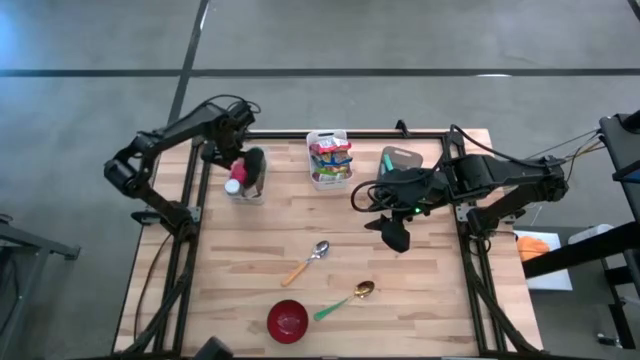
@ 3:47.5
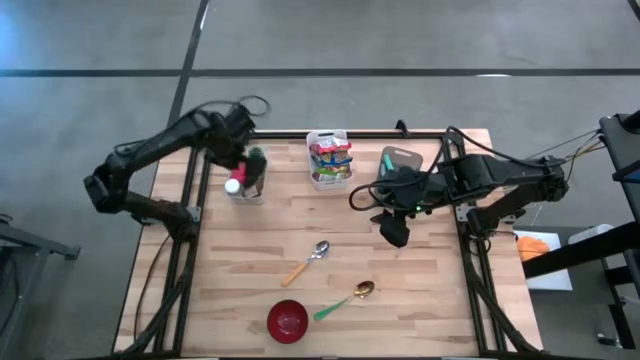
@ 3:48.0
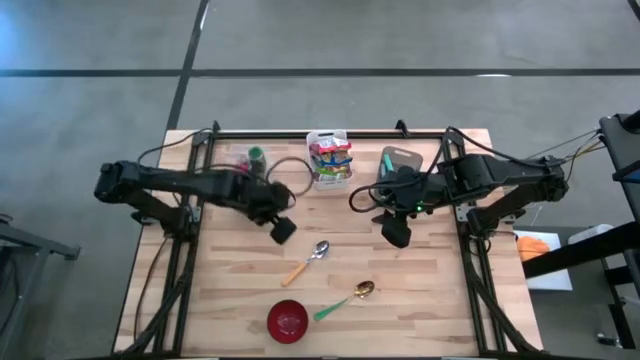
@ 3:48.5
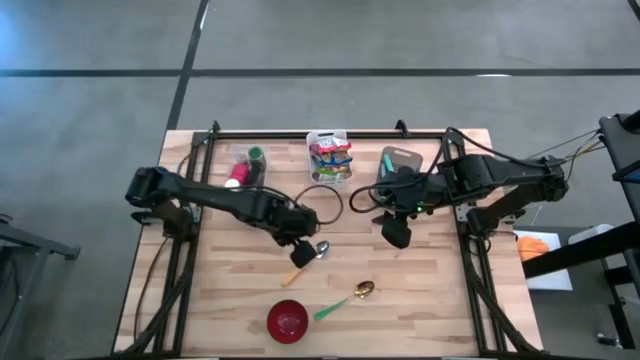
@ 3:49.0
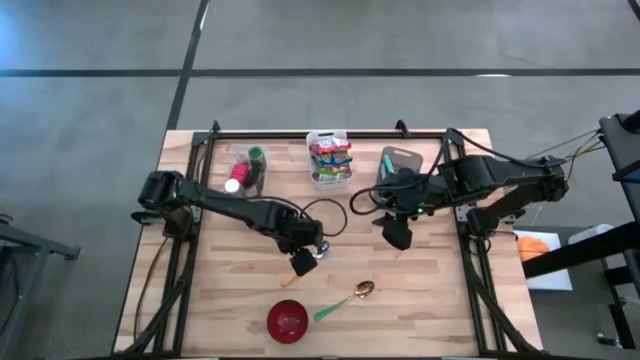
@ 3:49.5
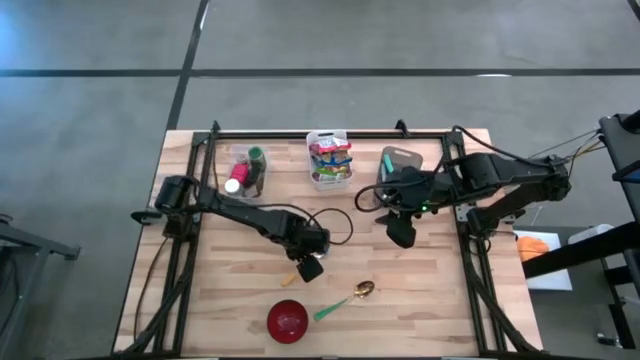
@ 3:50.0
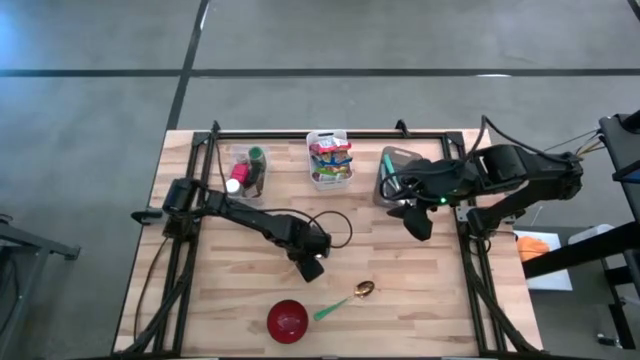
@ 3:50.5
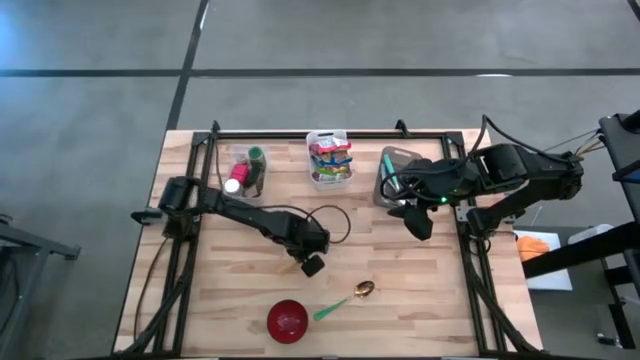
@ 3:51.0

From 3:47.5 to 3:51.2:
Put the yellow spoon into the black bin

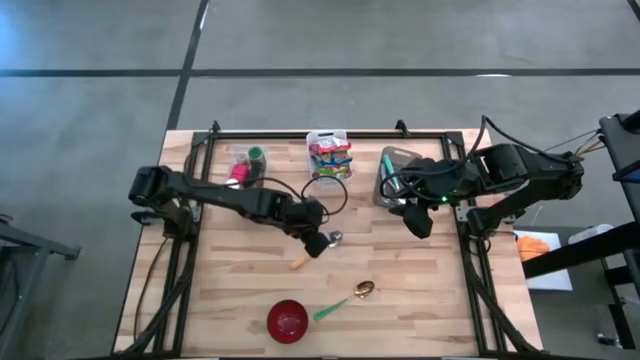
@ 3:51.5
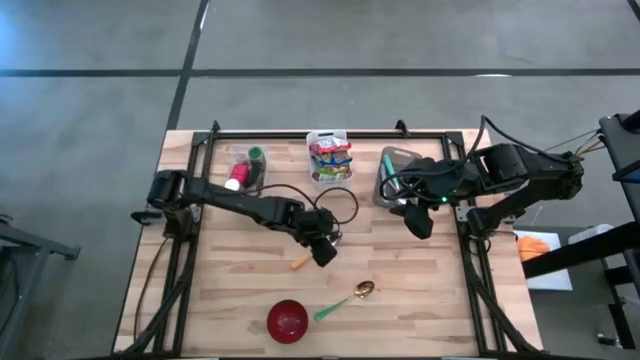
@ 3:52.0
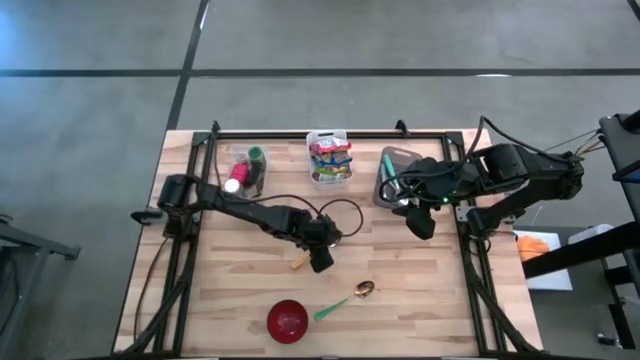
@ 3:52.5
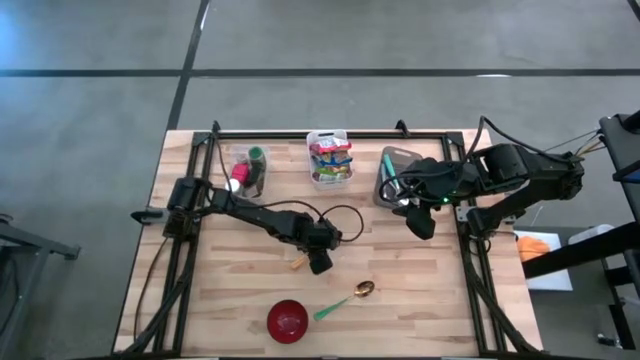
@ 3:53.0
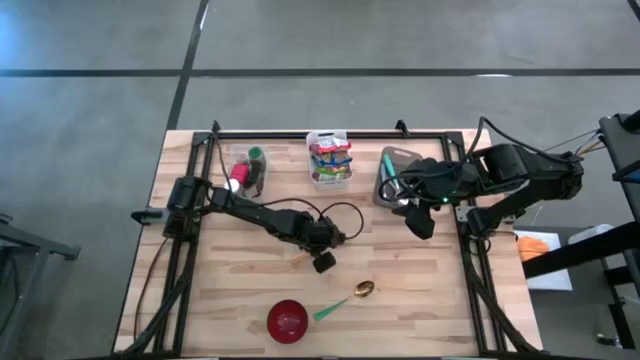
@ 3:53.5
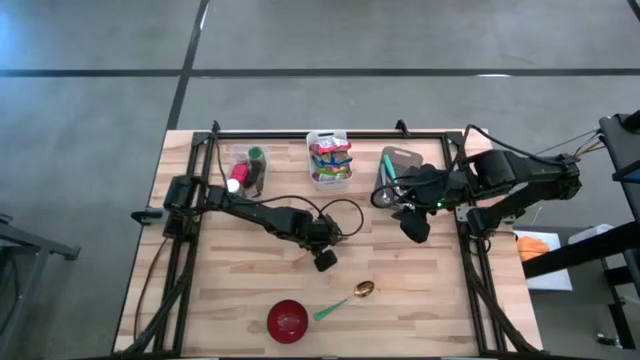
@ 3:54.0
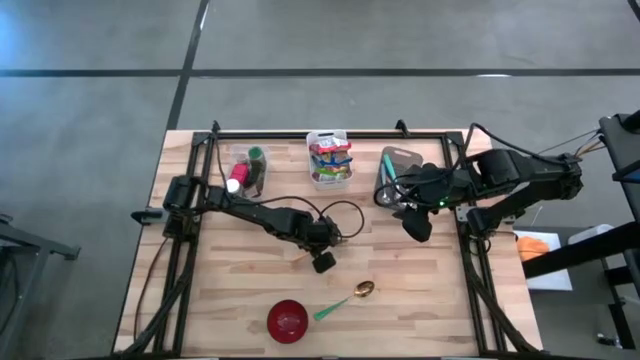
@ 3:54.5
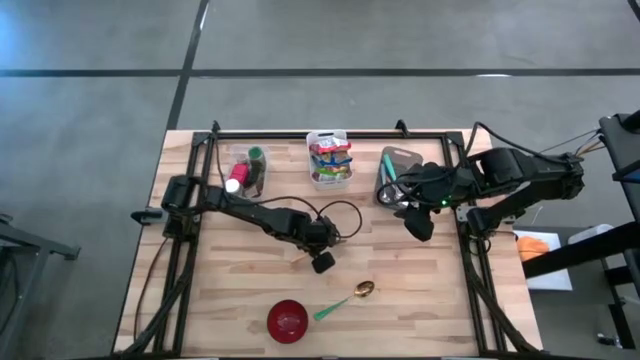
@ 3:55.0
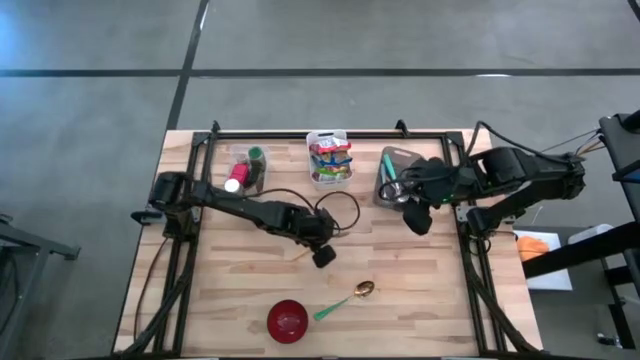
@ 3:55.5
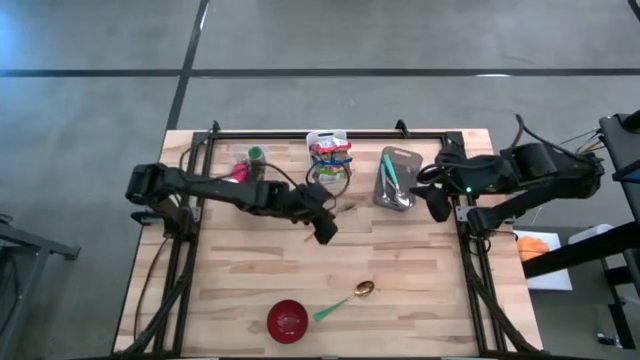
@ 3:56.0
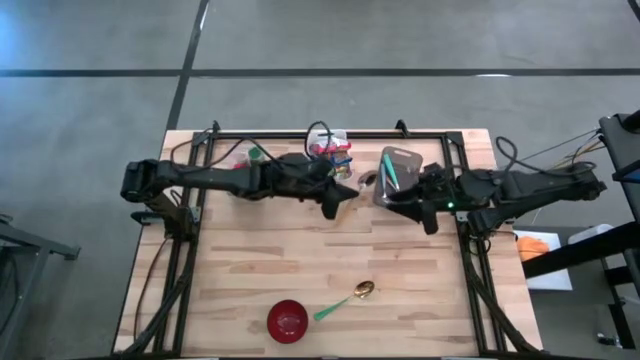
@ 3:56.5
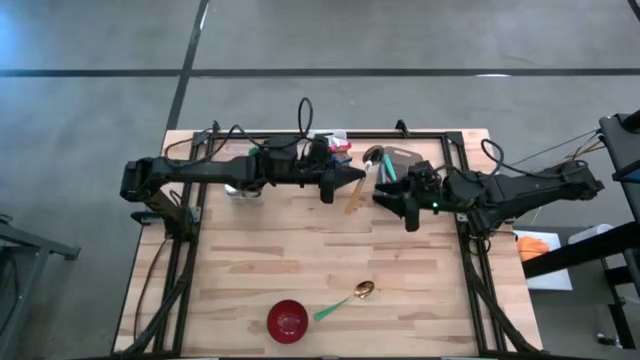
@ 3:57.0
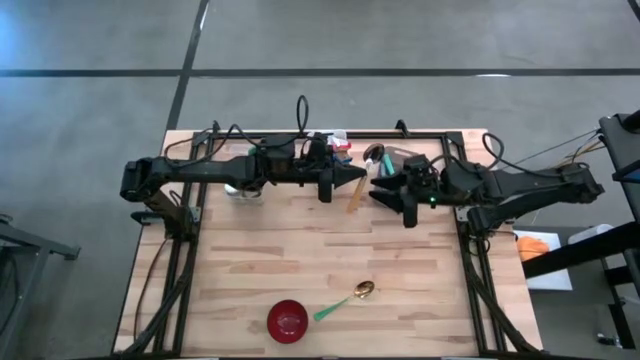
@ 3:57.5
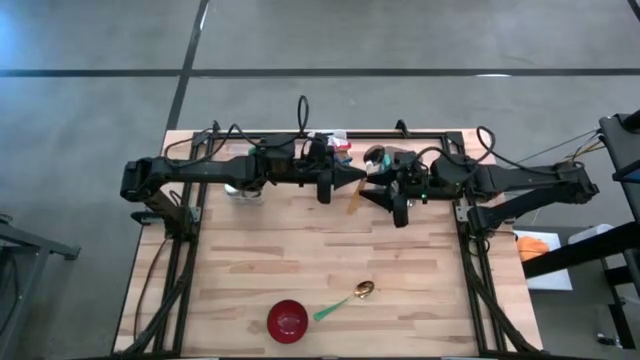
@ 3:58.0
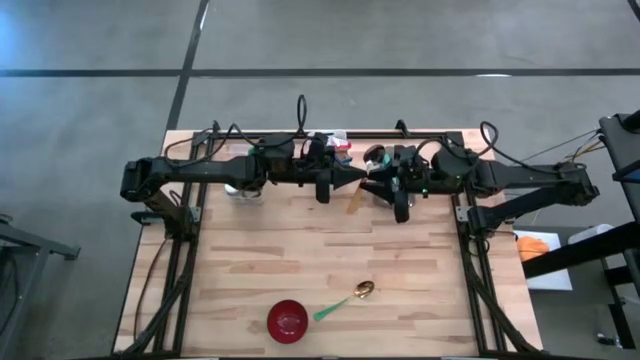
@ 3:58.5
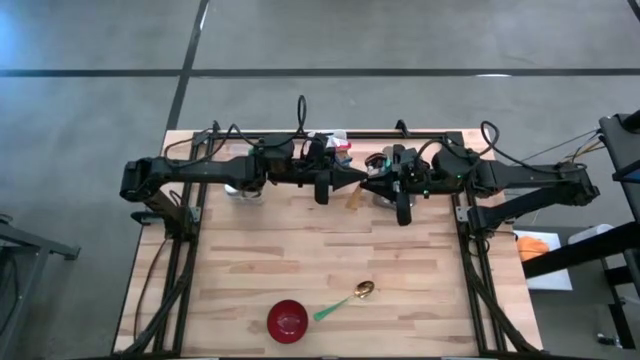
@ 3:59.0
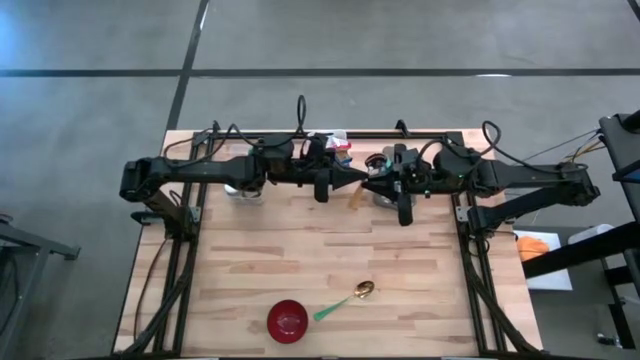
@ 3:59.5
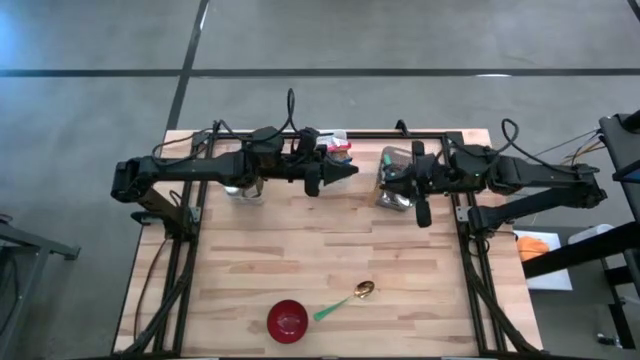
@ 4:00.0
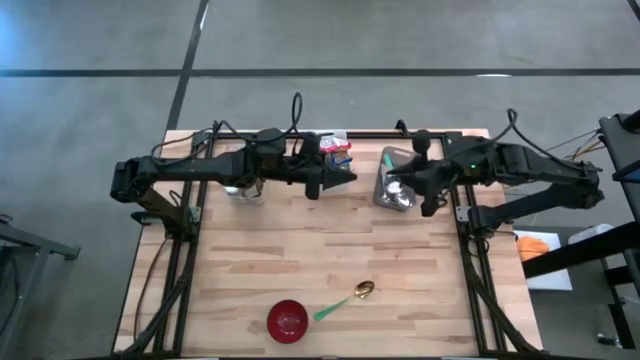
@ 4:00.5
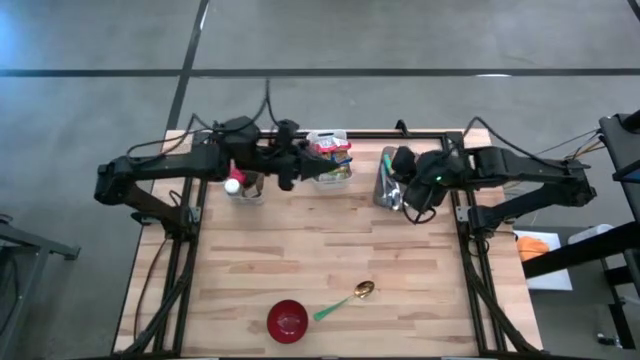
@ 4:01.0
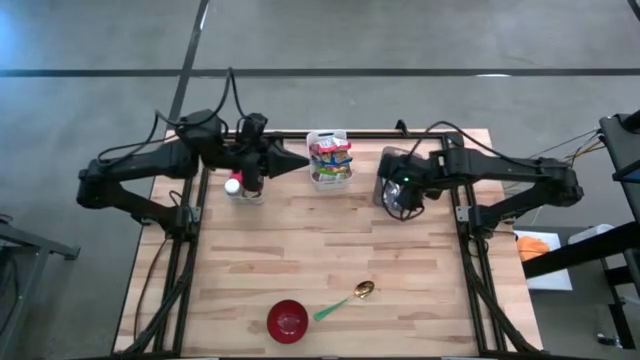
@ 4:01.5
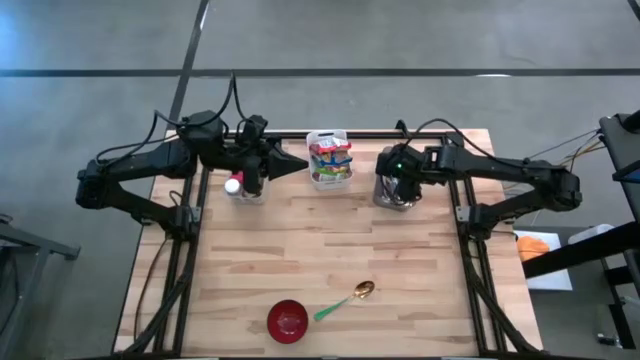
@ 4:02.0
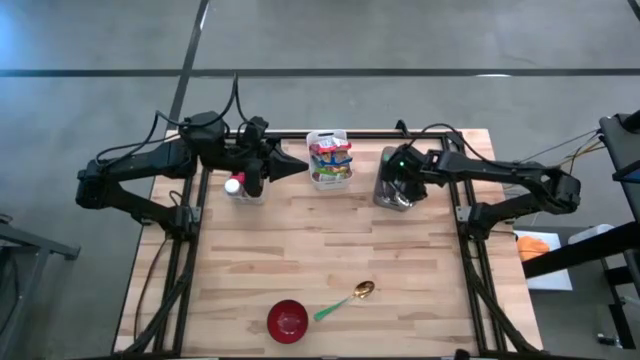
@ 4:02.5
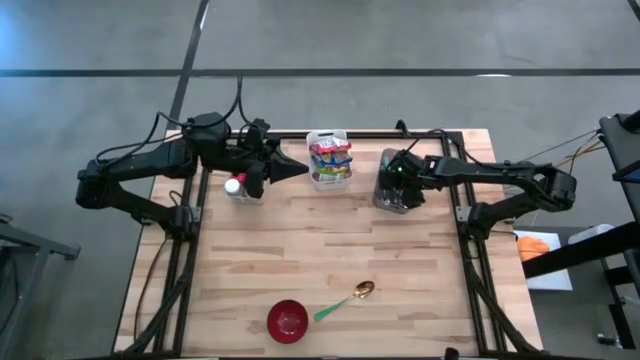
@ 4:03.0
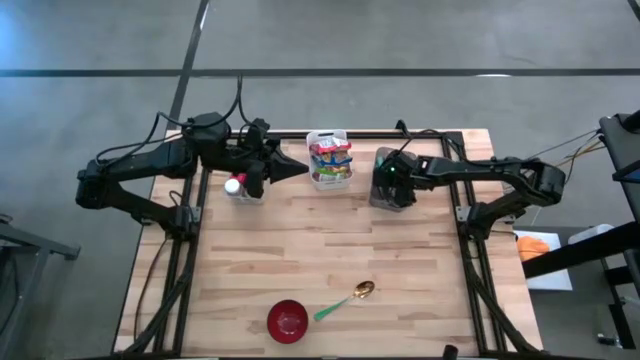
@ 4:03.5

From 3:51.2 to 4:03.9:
Put the yellow spoon into the black bin

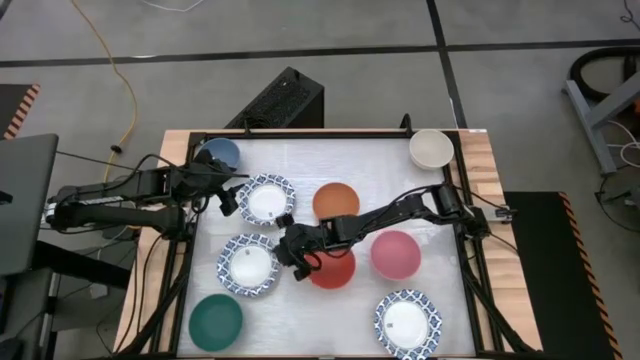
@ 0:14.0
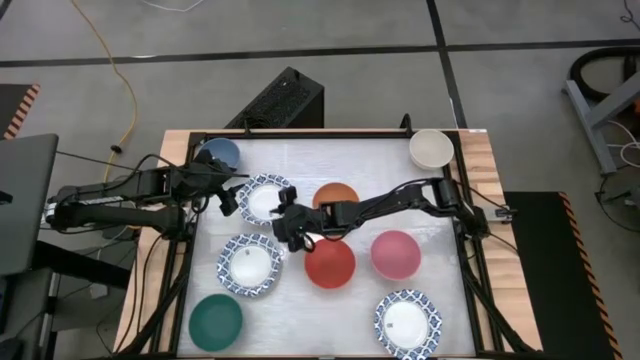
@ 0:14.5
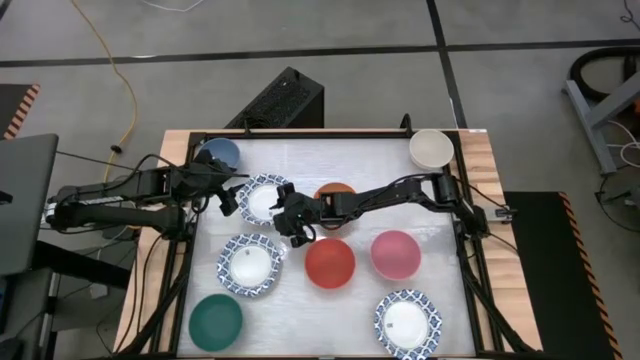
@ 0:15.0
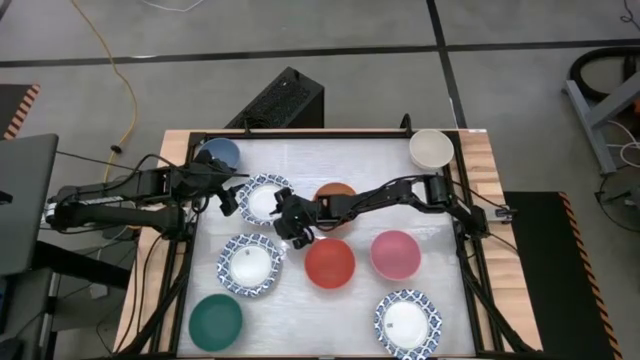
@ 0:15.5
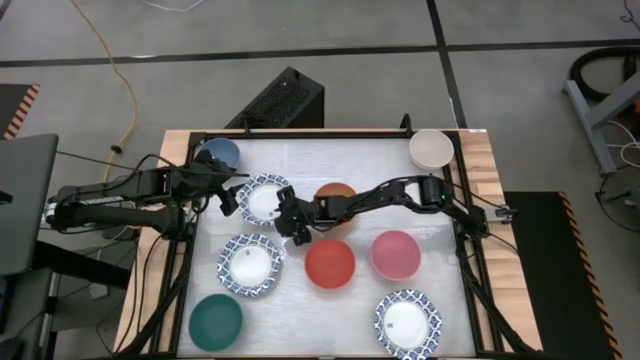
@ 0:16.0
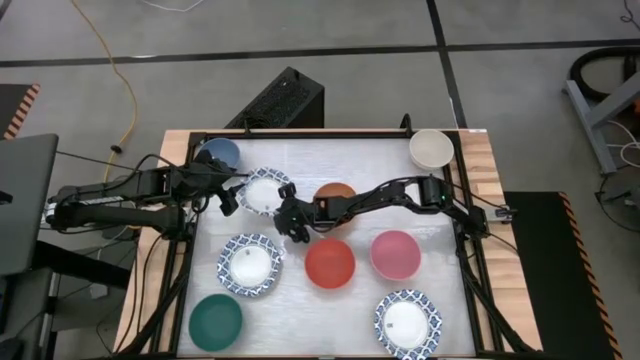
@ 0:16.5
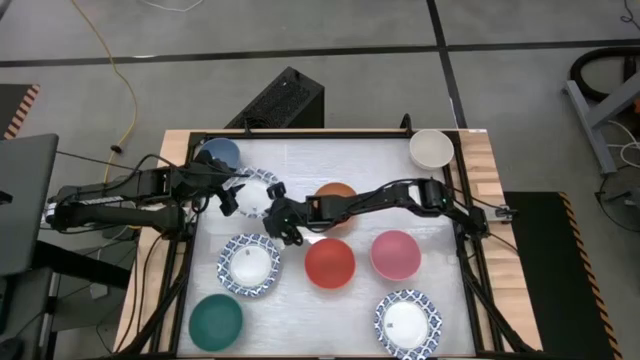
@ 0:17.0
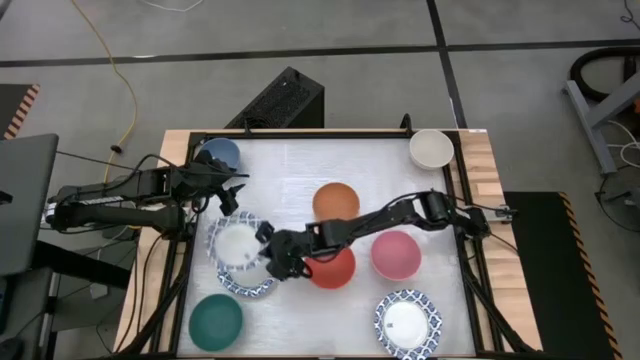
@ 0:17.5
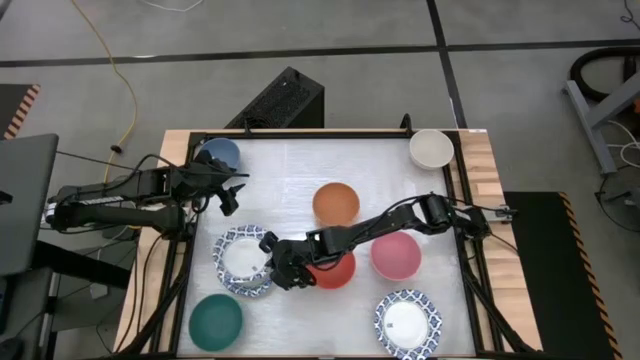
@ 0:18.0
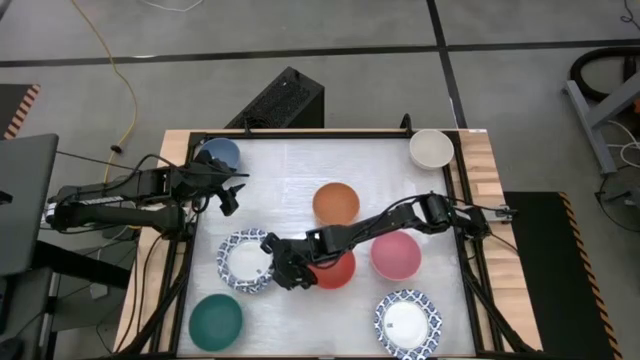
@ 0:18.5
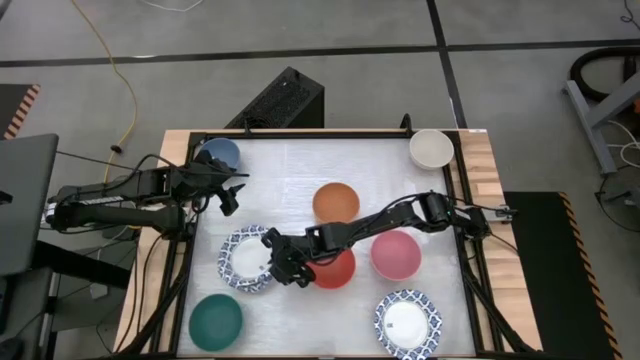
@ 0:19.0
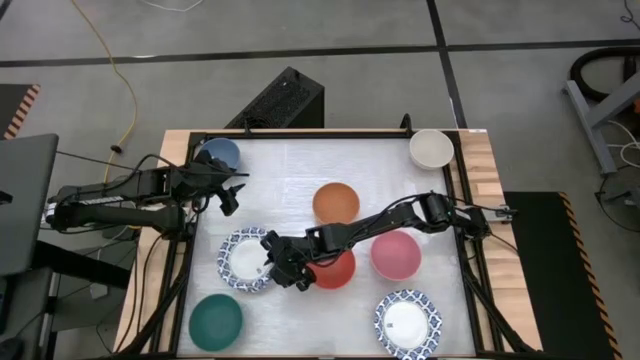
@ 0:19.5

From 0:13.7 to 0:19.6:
Stack the top white patterned bowl on top of the other middle white patterned bowl
